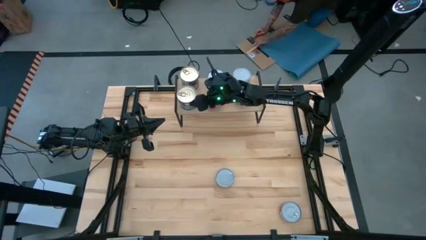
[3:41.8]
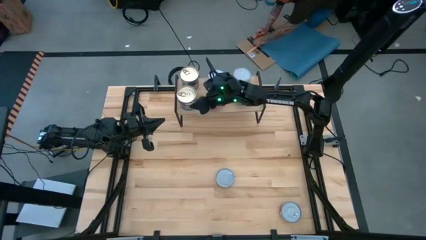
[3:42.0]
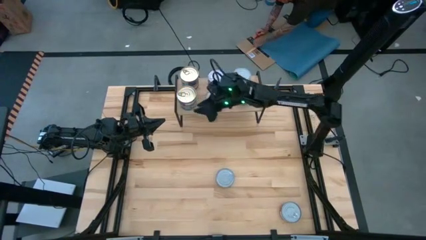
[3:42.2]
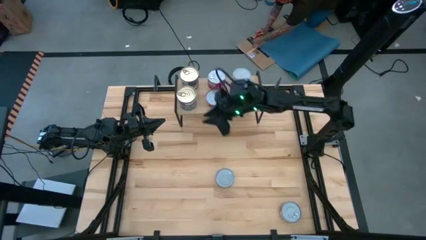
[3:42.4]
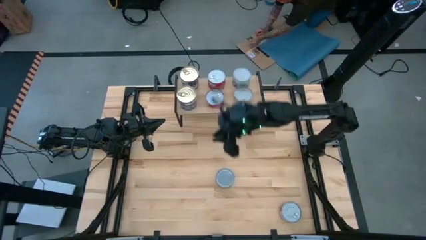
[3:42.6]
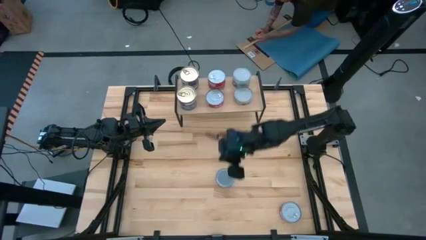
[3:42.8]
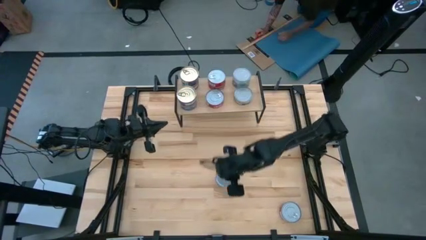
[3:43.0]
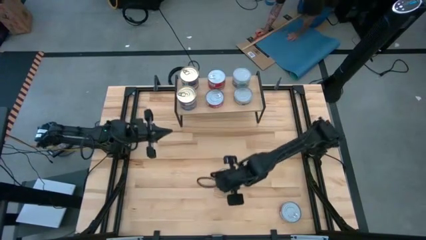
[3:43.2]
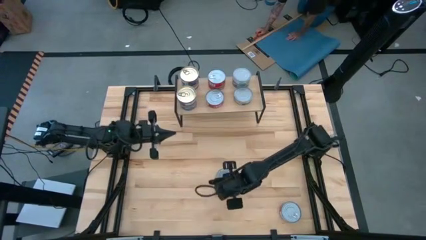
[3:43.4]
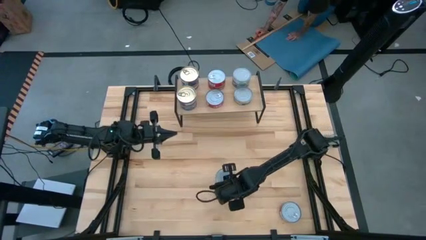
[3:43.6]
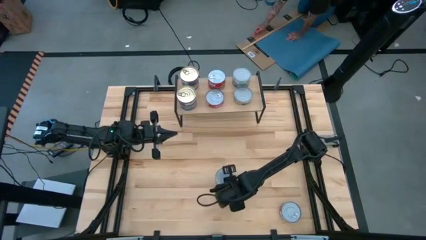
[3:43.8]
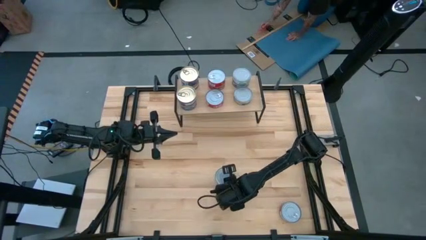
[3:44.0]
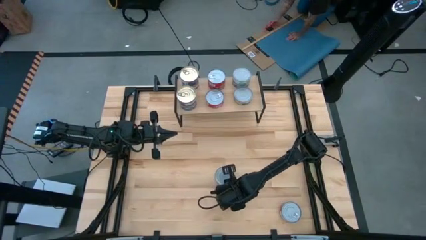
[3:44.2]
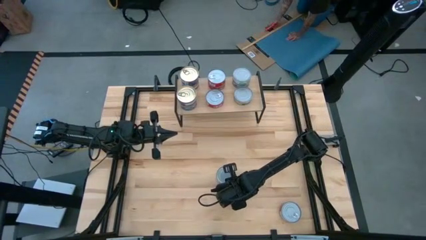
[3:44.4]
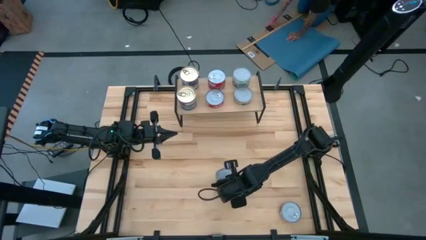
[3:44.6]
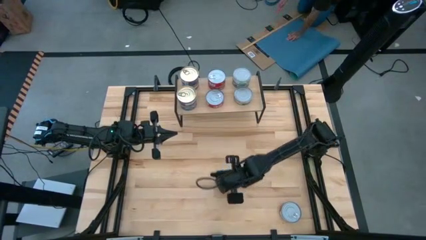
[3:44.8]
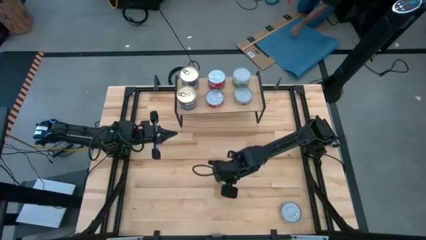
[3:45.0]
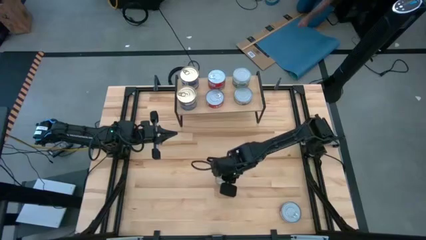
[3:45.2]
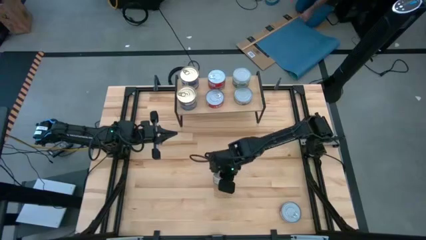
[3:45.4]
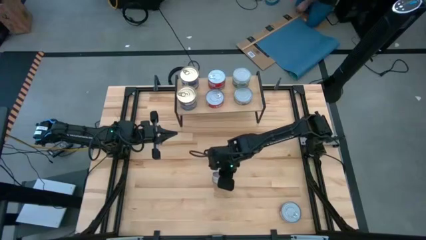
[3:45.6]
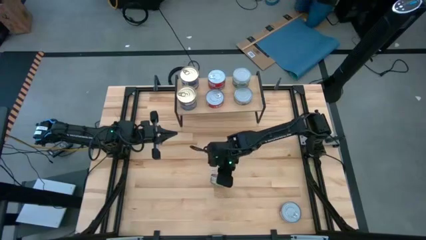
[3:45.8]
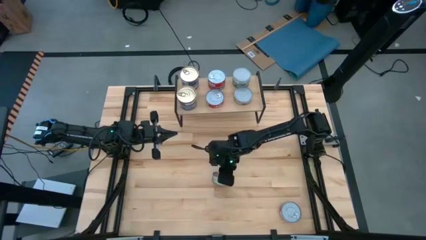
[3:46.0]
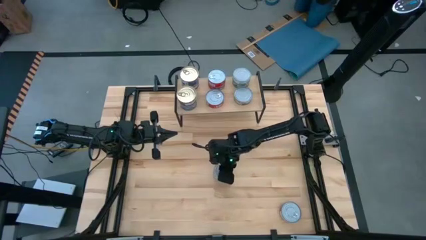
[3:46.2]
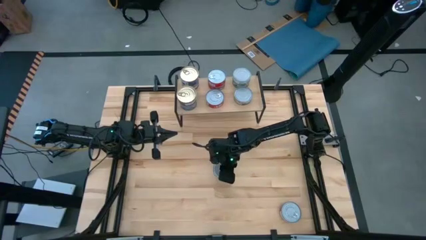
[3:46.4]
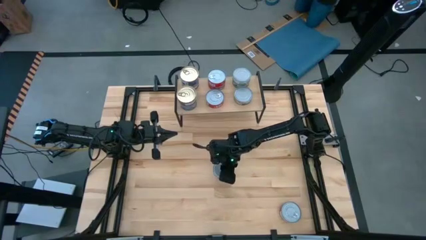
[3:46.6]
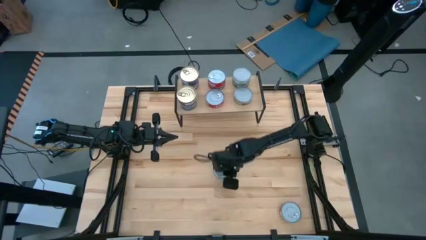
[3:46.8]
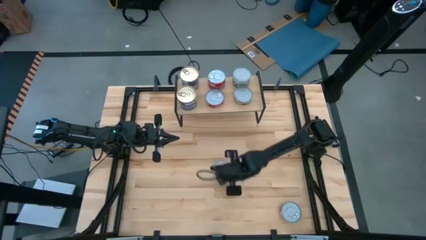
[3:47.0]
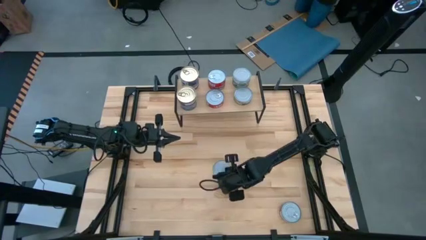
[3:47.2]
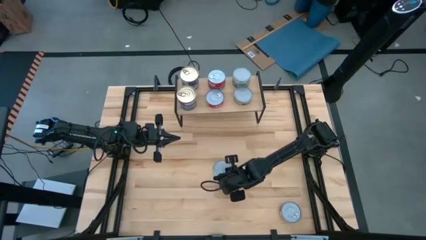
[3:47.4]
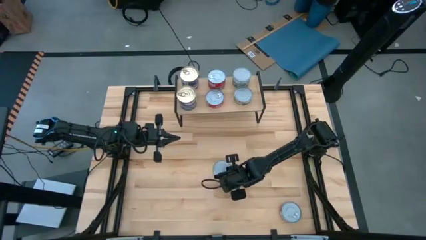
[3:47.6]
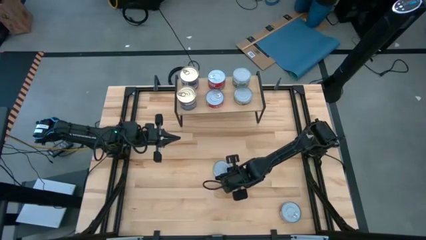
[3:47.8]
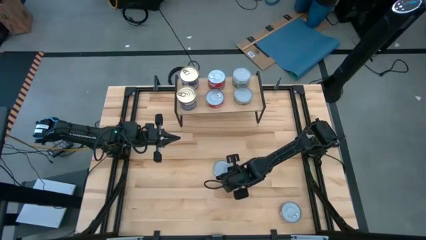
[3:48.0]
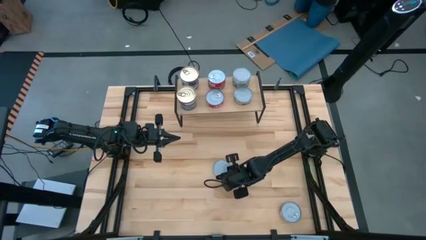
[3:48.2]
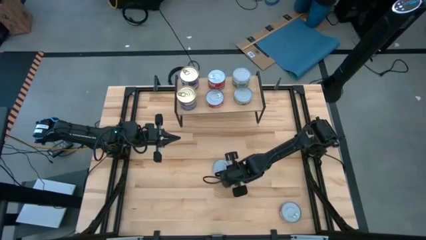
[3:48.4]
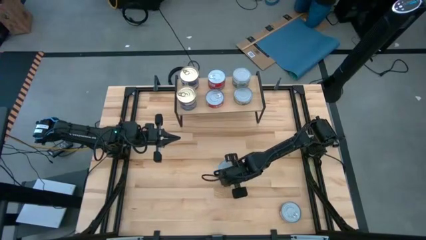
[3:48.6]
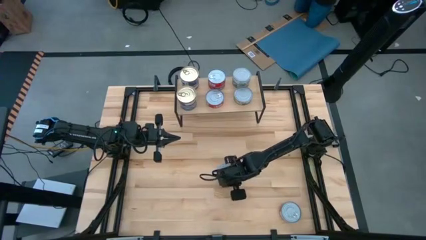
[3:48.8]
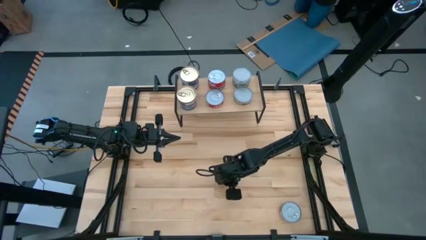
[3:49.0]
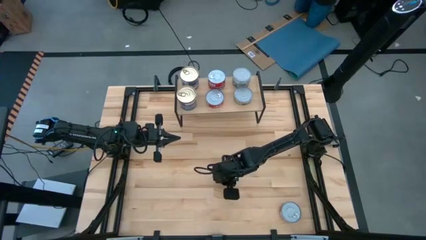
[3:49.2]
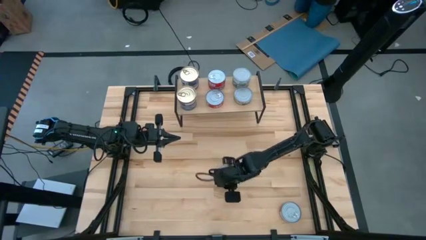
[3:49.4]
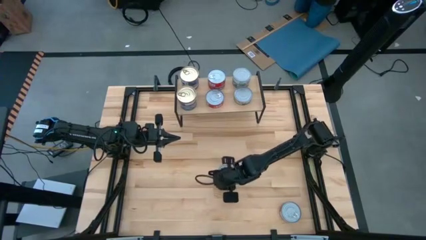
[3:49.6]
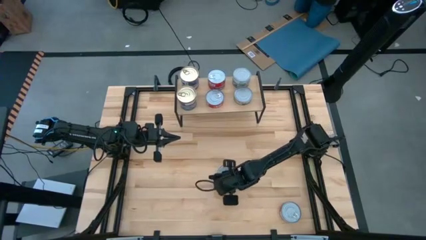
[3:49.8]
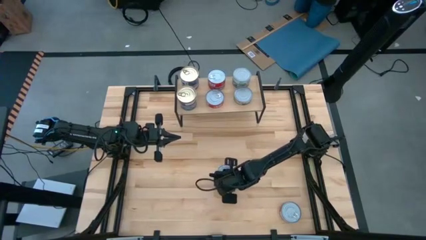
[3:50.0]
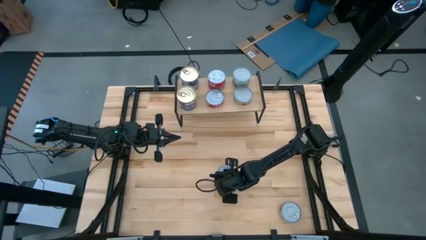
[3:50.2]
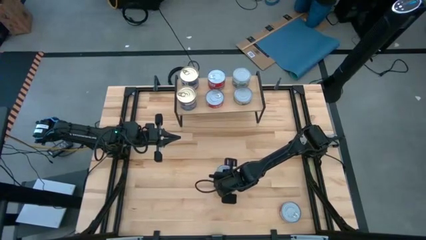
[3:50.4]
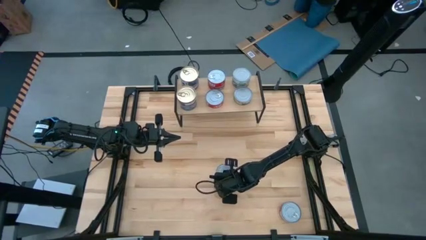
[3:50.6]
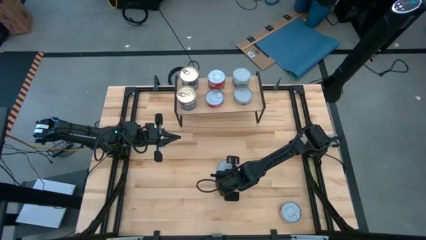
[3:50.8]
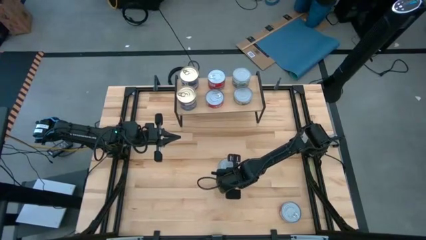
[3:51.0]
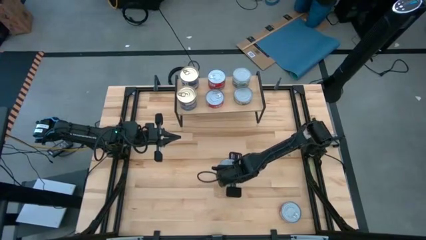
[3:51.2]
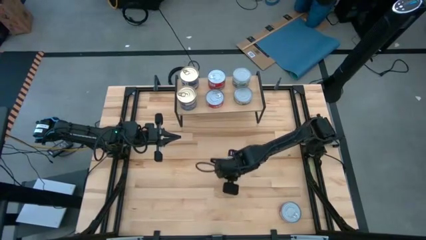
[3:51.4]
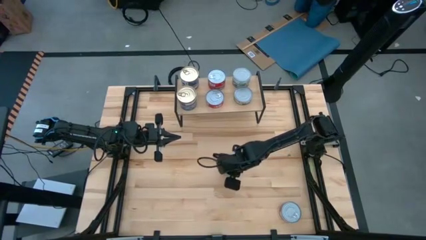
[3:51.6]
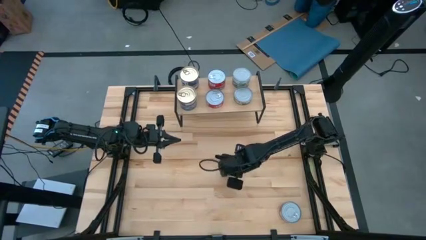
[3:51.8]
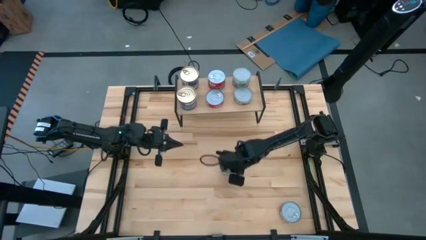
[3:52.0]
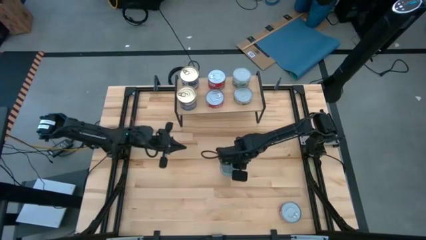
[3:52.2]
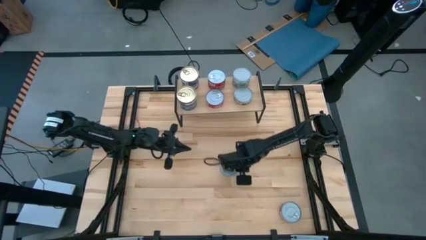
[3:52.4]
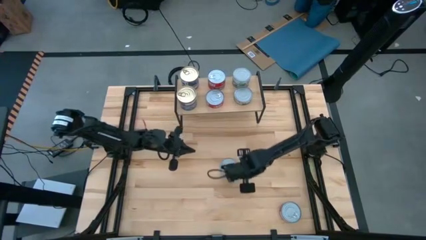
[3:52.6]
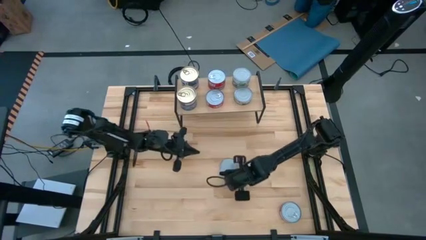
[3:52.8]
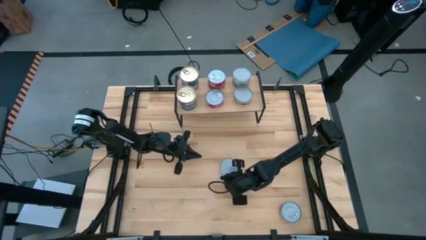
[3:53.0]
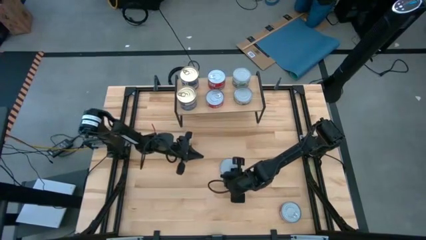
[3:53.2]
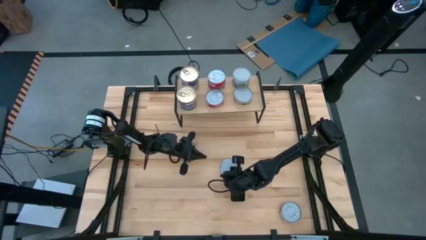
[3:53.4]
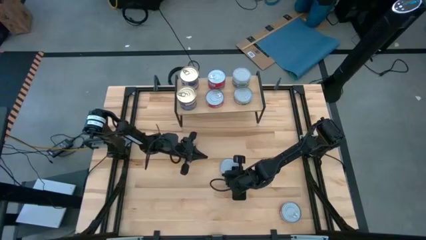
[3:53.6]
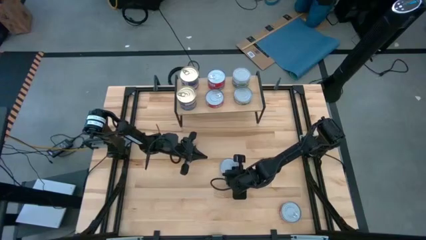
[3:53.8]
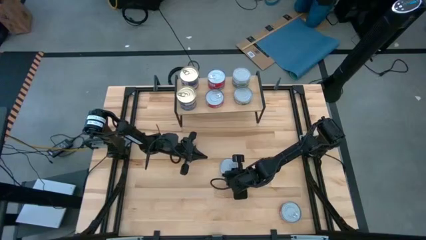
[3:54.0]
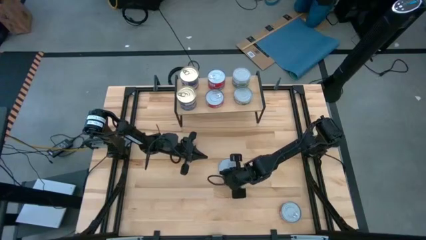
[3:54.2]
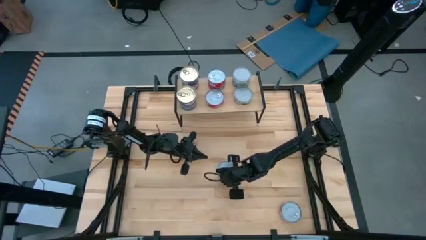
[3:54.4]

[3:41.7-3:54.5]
Task: Stack canned seafood by type on shelf
Stack the green tuna can on top of the other green tuna can on the shelf

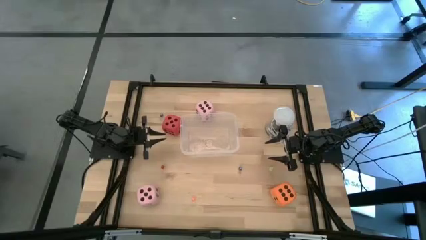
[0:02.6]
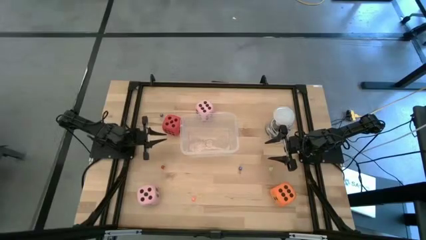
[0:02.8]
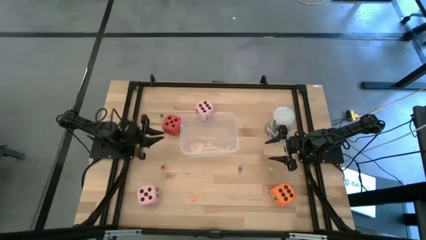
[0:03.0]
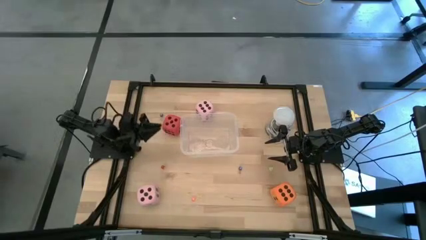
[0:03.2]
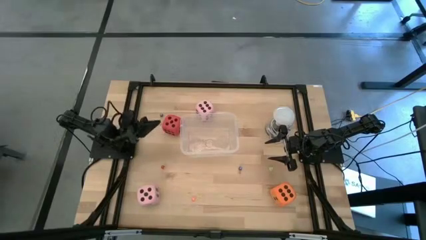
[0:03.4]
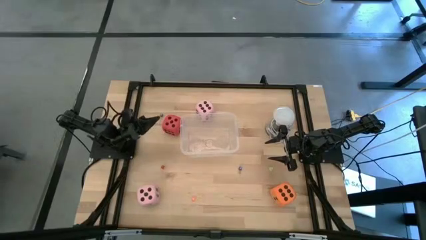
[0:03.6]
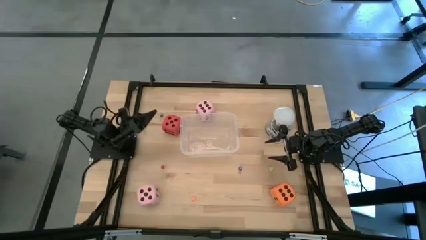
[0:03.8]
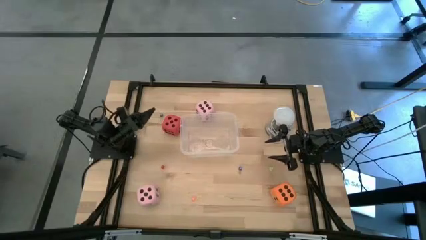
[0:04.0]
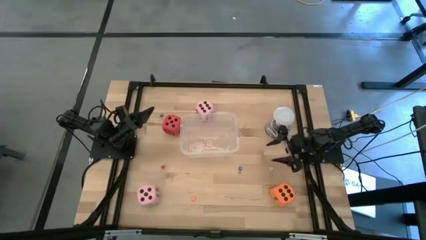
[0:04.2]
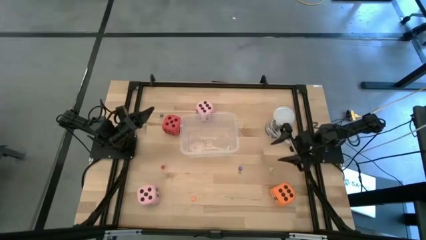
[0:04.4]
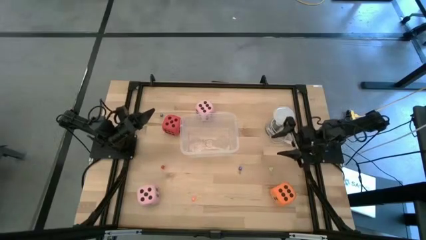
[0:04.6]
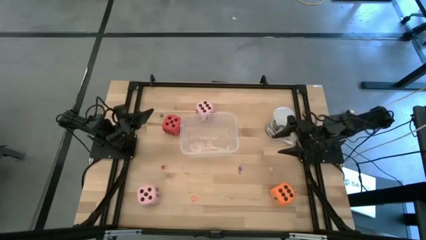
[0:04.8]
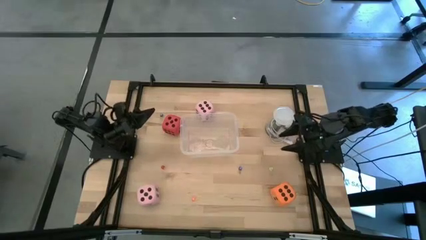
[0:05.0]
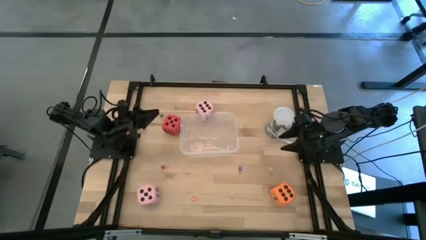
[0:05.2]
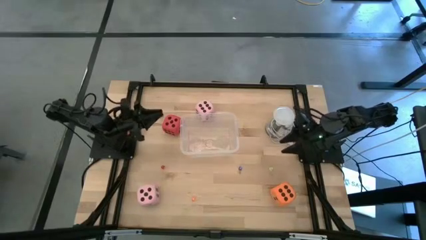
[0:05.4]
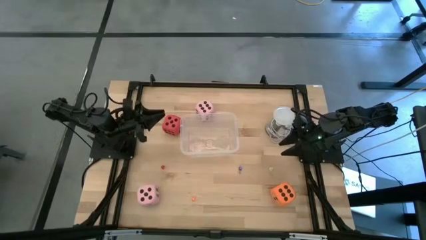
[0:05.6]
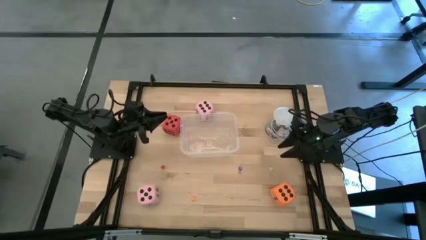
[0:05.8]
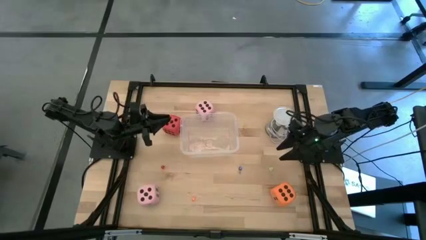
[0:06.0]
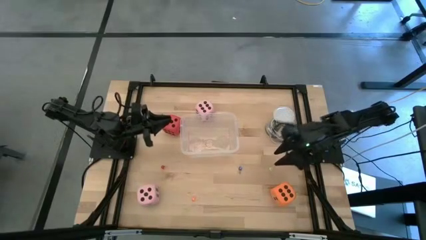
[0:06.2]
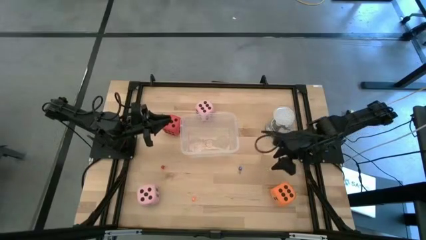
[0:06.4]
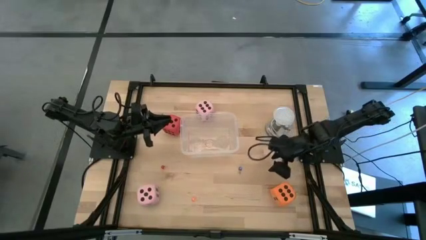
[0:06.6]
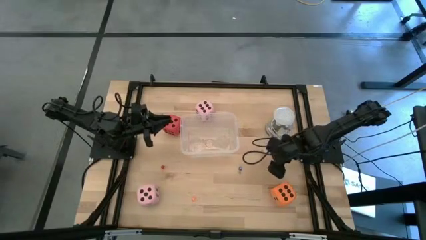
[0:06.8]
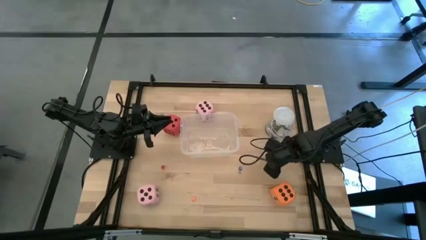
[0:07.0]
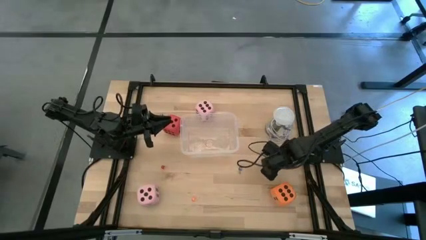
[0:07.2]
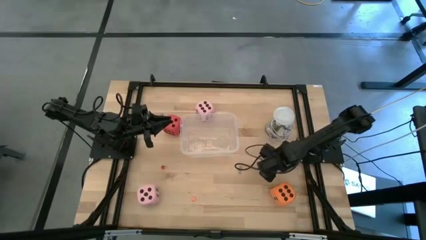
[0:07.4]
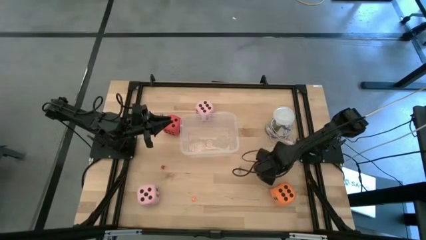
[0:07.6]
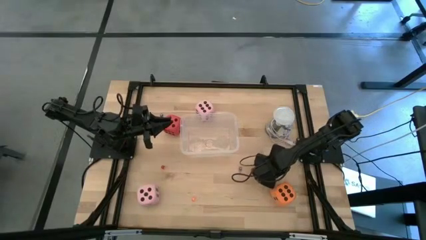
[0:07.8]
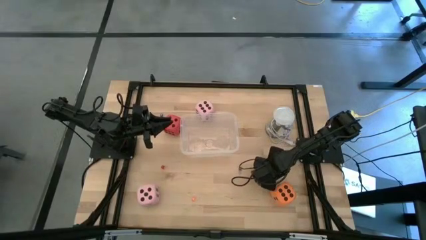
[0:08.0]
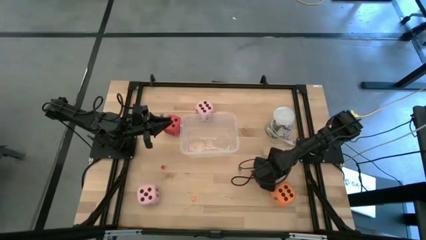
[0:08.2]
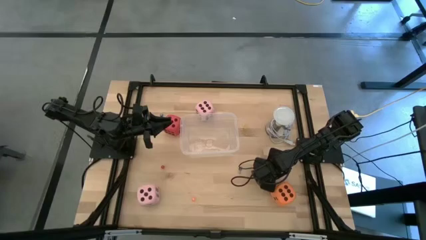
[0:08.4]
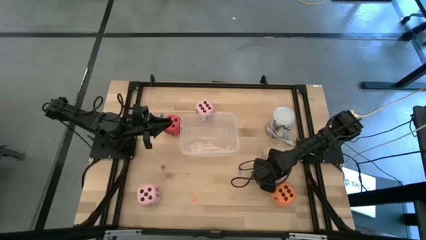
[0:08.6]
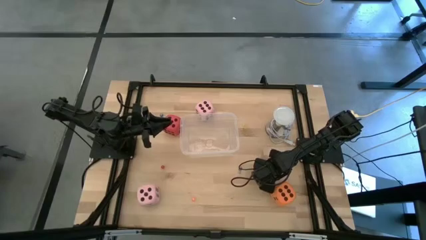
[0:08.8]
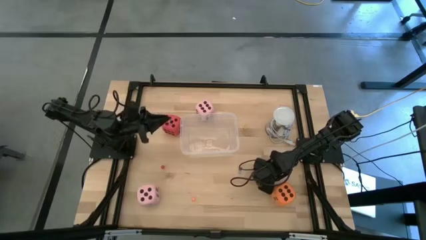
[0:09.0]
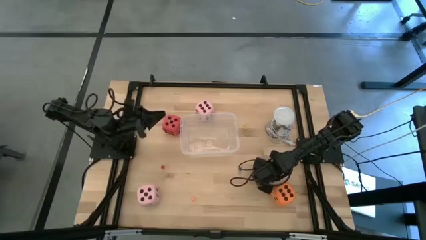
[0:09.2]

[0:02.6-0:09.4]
Task: Pick & Place Dice
Put the small green dice into the transparent bin
